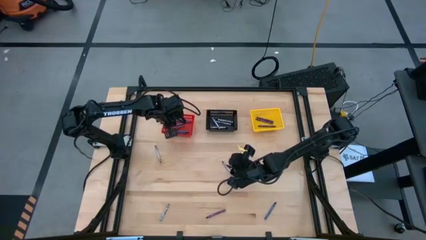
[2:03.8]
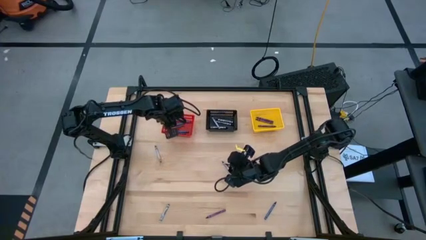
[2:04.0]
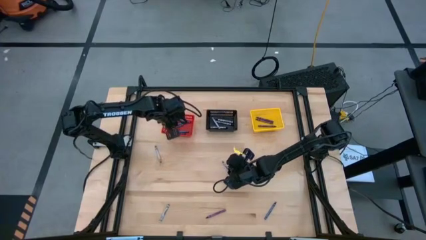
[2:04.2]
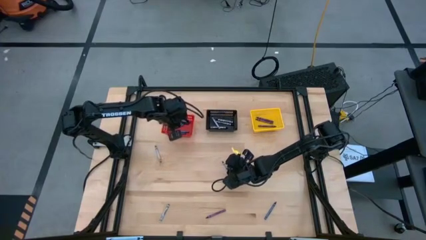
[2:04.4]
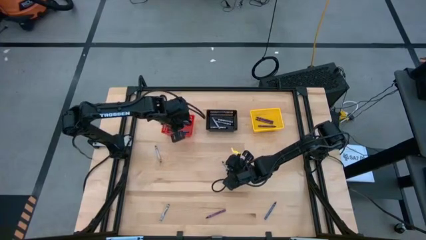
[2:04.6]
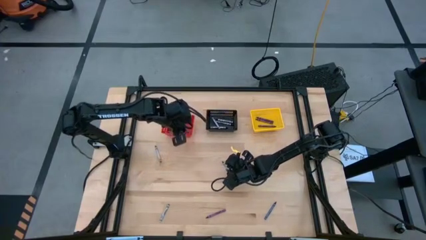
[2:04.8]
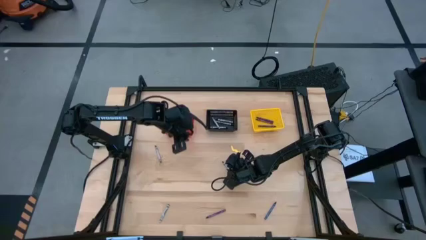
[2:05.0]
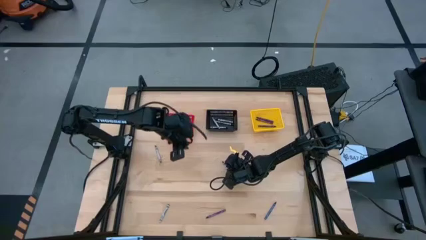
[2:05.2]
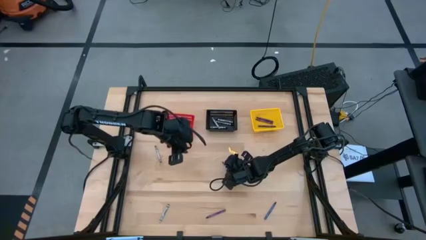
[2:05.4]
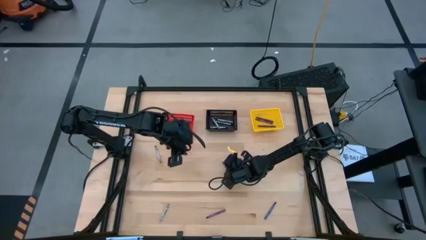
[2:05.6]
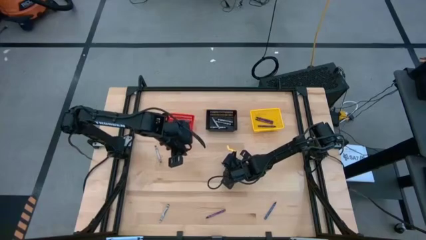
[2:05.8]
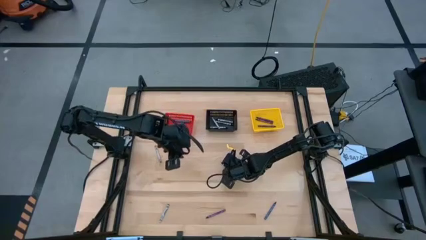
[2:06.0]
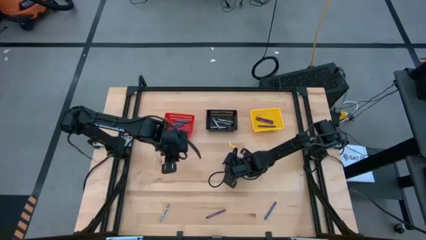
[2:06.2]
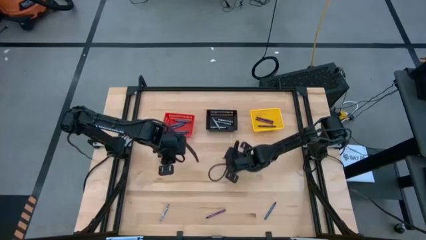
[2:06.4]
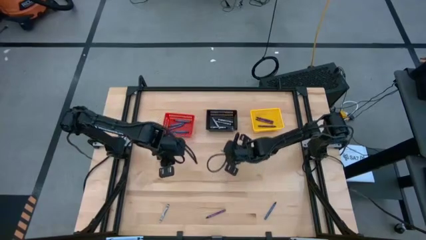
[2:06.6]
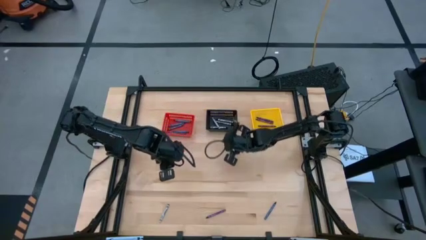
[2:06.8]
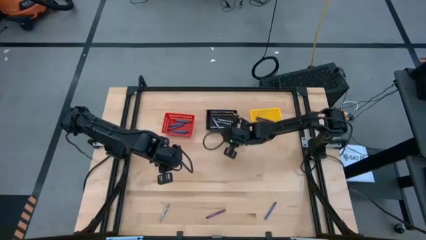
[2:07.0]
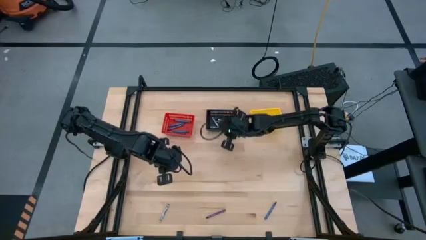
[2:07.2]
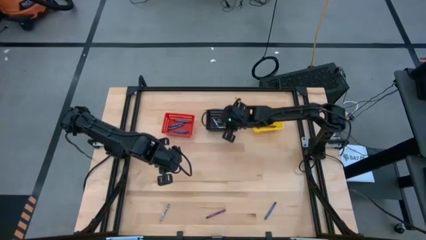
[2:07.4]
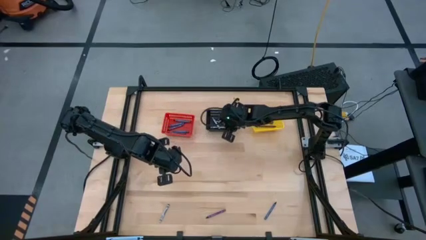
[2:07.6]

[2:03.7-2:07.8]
Task: Sort crayons
Put the black crayon into the black basket

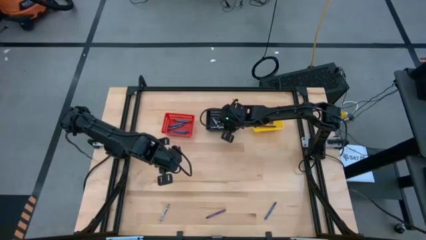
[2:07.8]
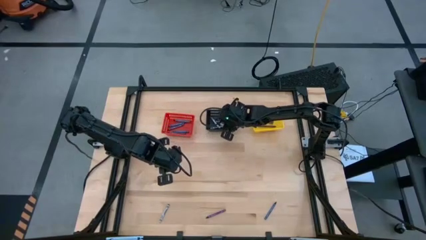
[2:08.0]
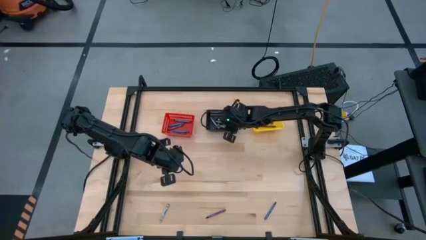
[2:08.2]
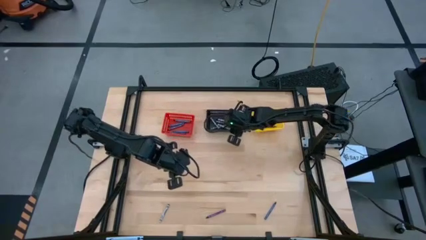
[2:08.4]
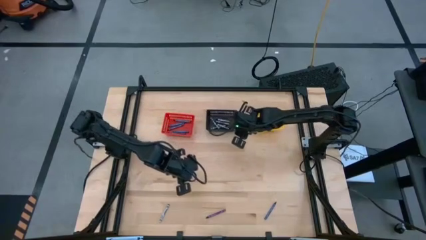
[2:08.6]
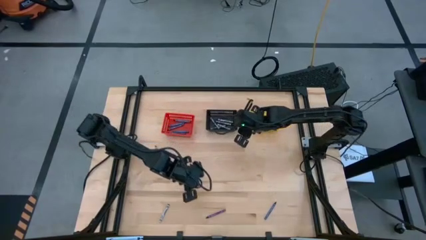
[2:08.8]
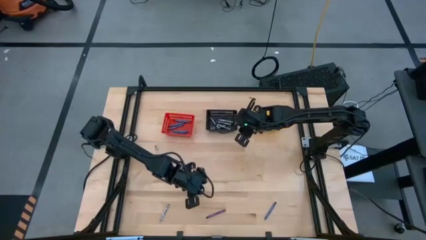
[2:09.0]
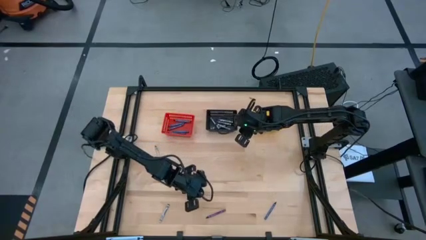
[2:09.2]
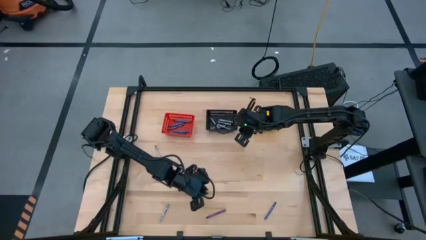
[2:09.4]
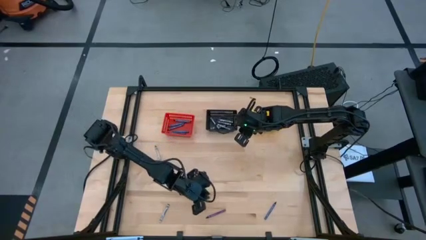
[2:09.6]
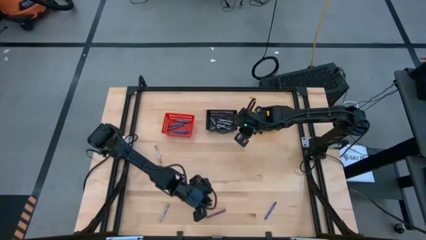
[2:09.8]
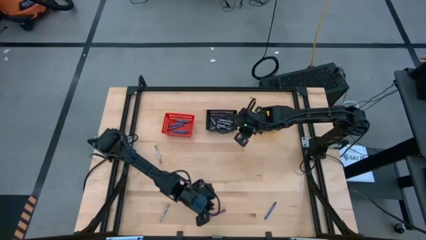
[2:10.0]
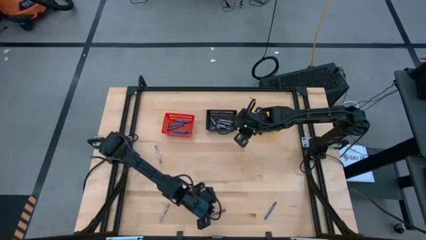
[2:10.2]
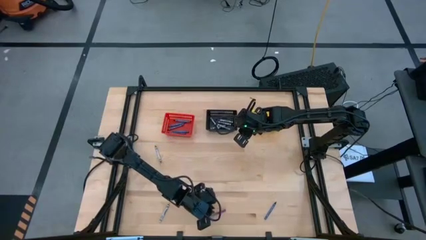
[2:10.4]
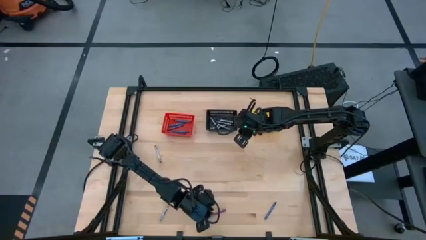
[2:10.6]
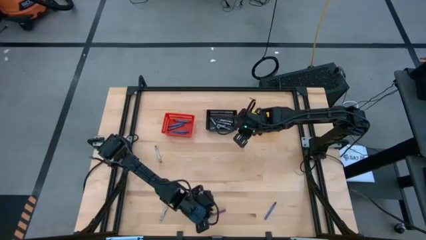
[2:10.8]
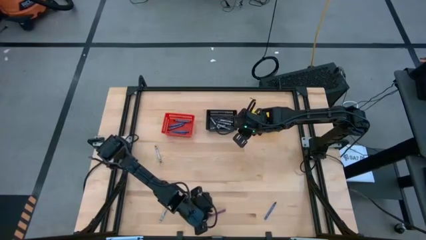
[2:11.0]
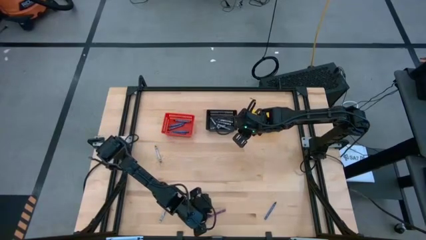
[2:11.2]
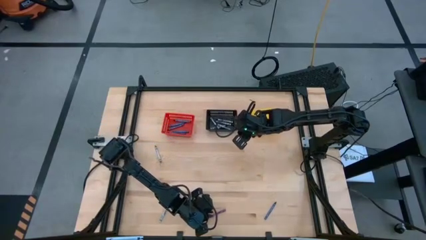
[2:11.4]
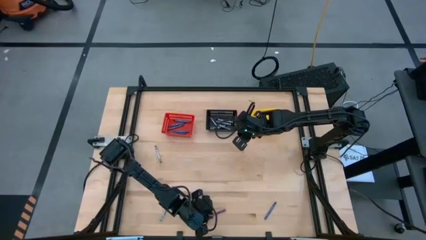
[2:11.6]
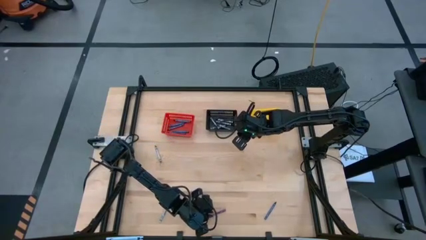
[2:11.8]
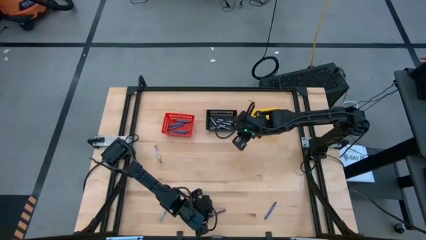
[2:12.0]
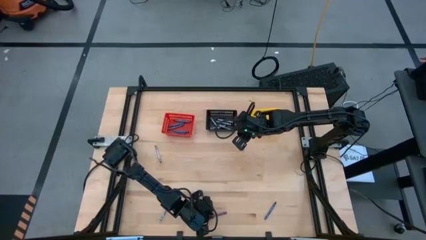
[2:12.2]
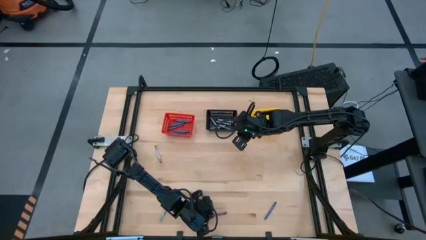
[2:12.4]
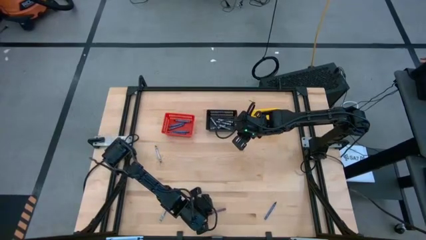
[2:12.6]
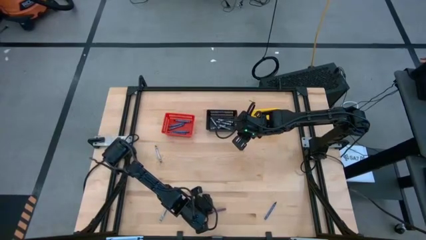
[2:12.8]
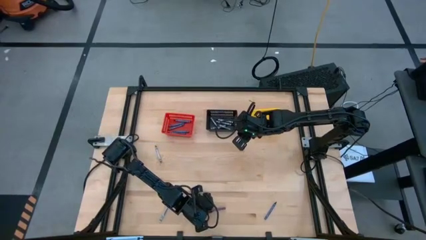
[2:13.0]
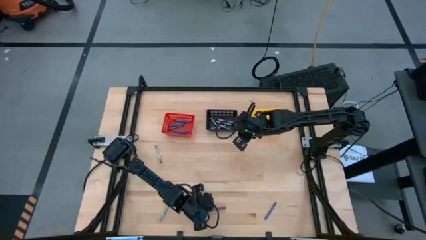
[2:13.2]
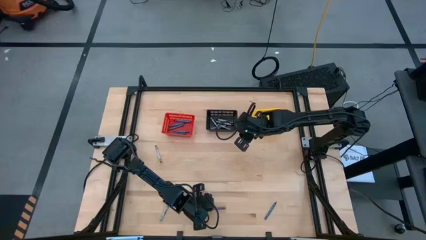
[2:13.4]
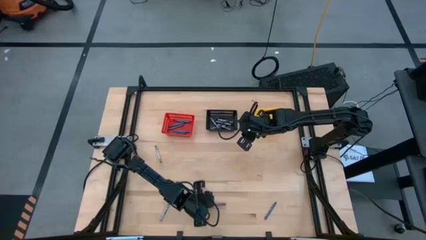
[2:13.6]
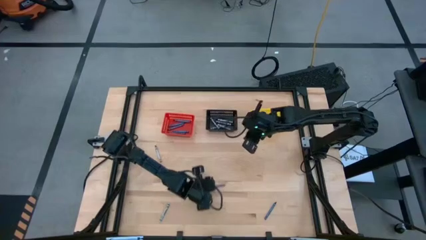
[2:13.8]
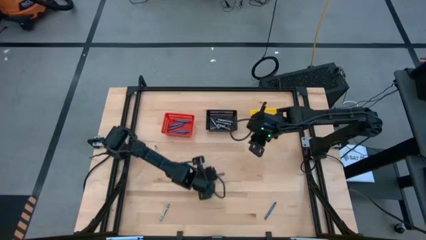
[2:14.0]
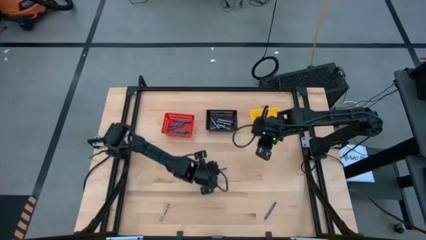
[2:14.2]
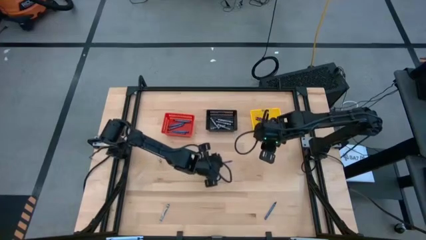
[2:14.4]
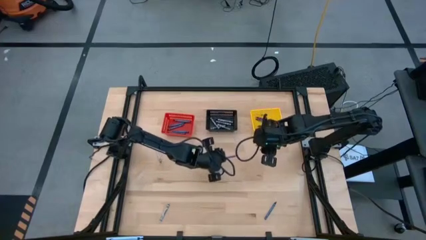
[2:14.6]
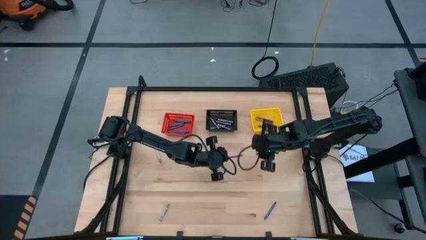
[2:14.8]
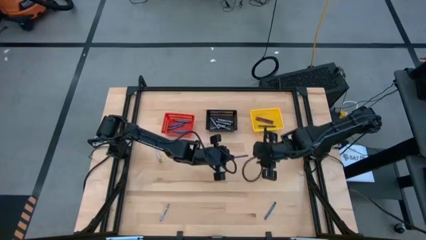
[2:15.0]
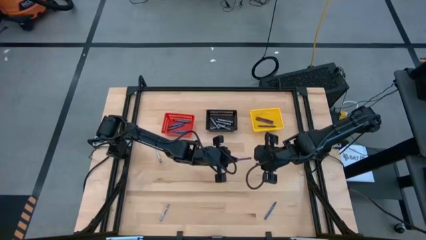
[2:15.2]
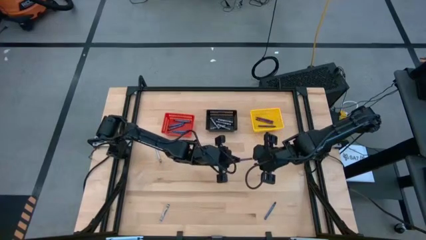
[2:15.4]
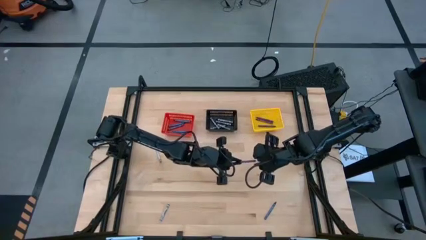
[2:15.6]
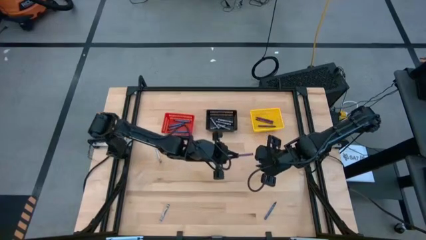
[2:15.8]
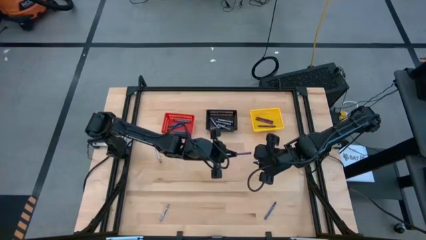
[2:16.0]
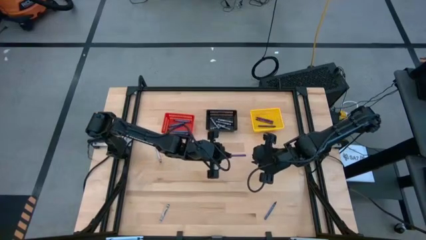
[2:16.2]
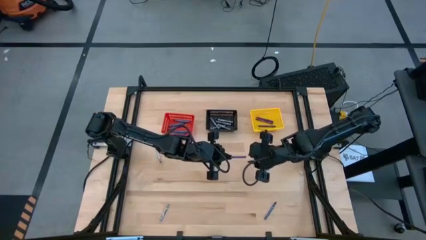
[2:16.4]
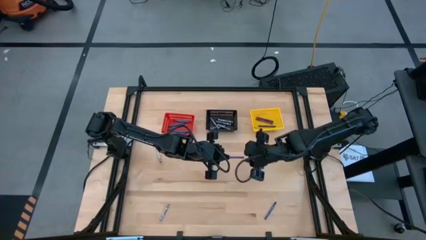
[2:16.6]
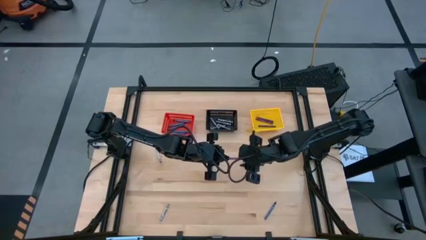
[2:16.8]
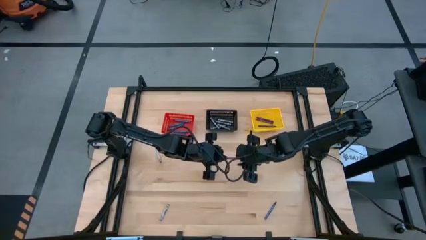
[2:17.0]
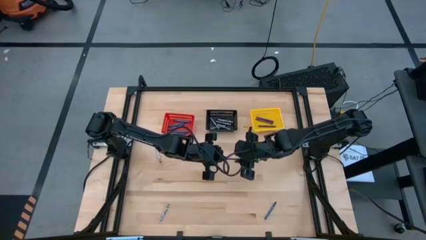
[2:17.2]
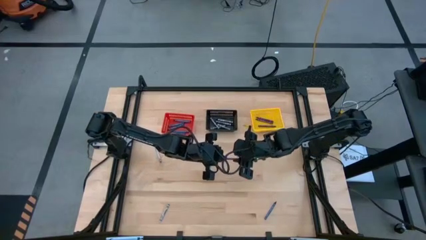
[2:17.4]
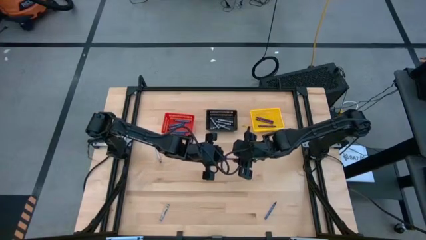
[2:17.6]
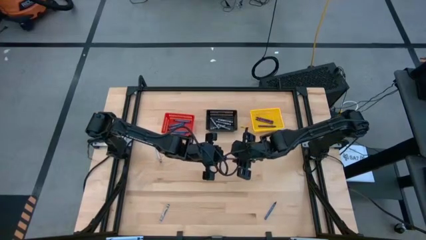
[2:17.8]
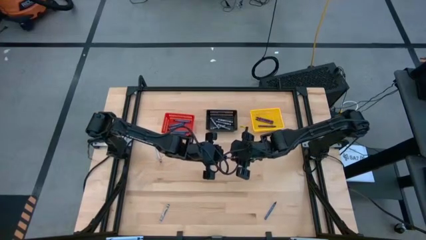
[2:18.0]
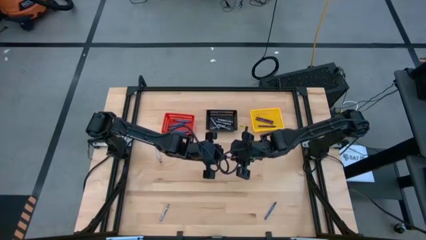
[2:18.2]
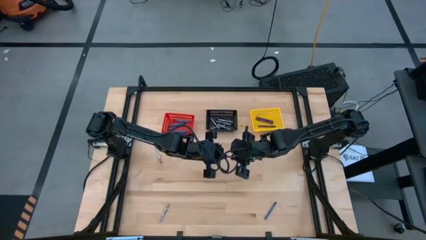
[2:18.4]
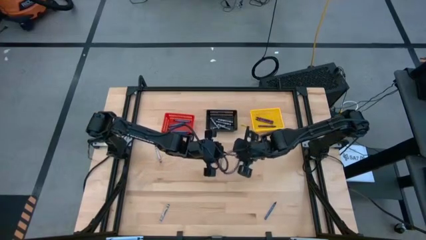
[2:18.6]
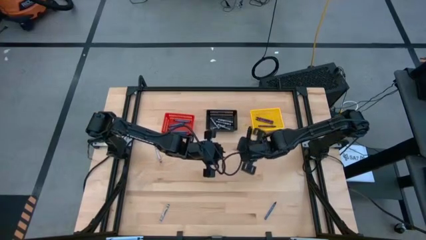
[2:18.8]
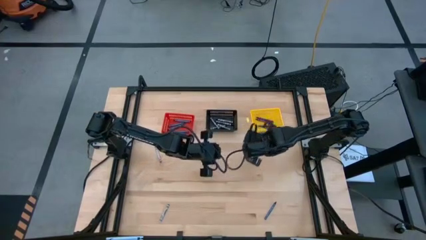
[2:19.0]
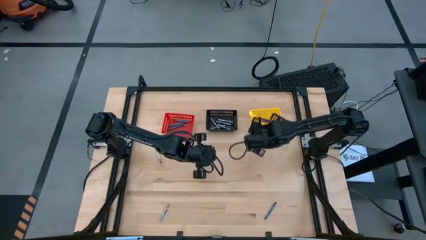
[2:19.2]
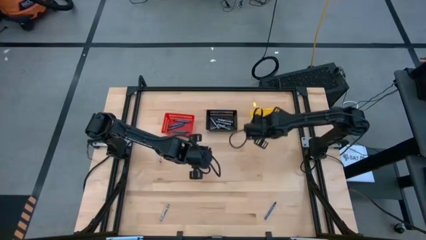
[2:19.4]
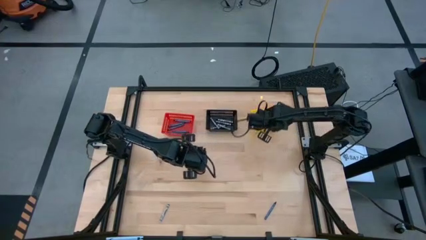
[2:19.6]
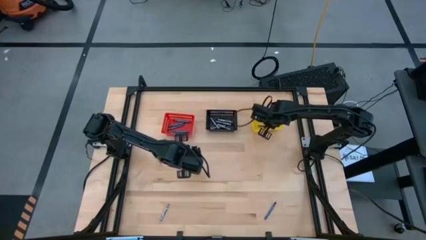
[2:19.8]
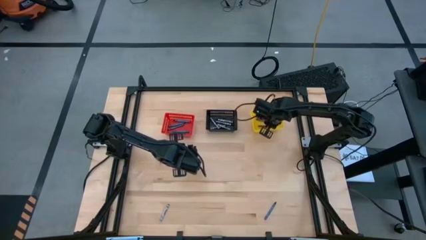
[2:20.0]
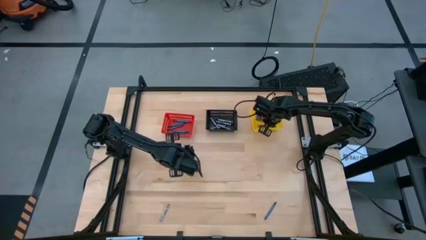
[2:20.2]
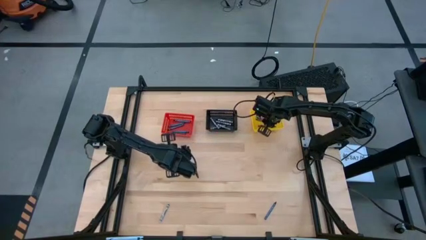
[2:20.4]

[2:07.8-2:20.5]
Put the purple crayon into the yellow basket
